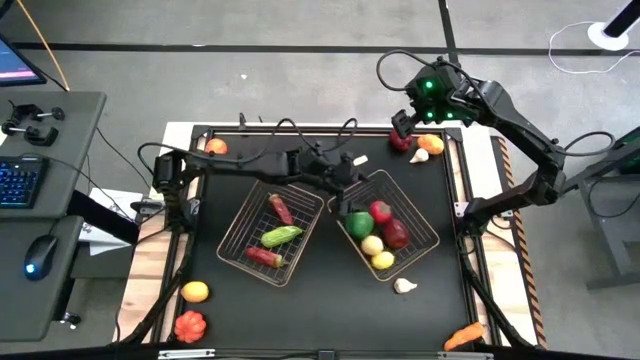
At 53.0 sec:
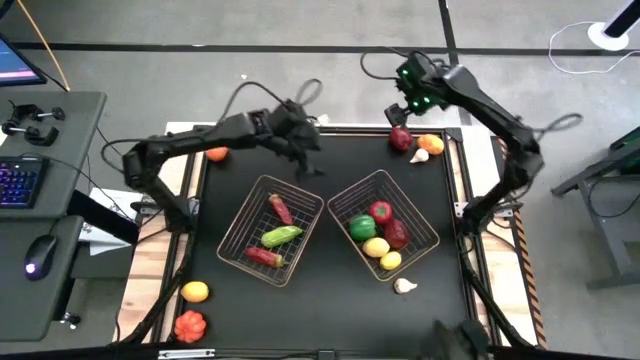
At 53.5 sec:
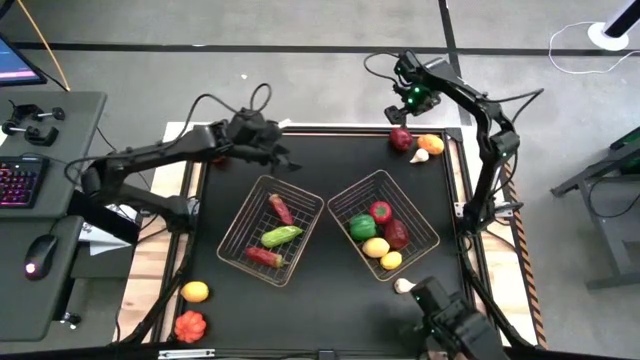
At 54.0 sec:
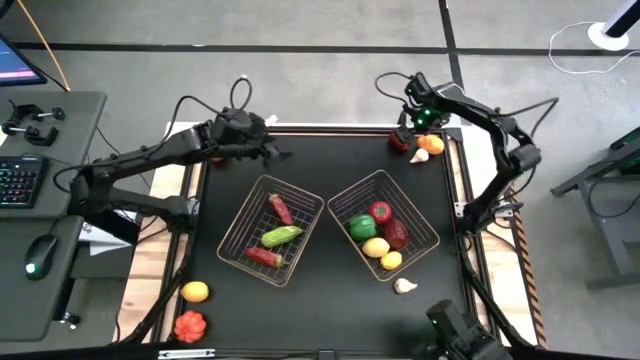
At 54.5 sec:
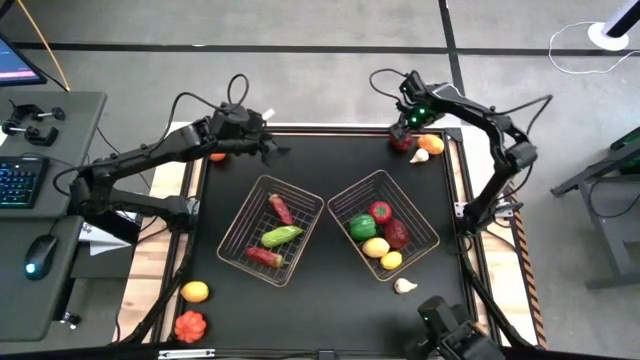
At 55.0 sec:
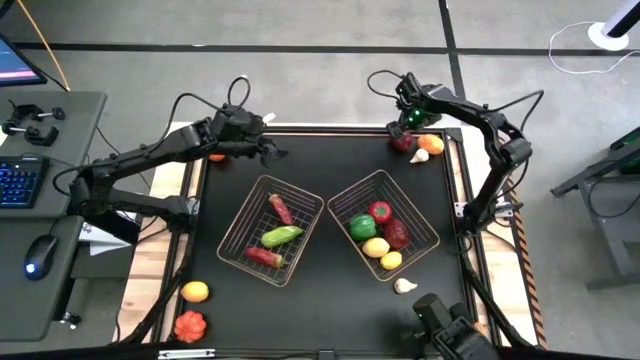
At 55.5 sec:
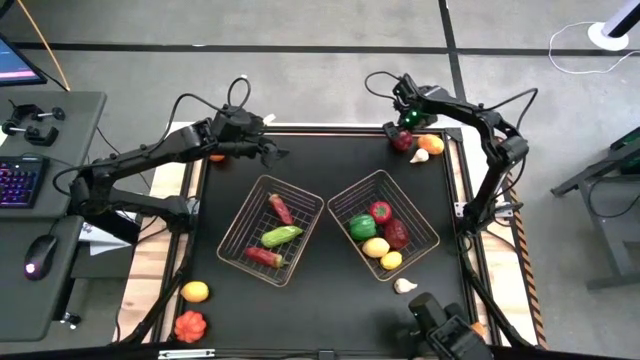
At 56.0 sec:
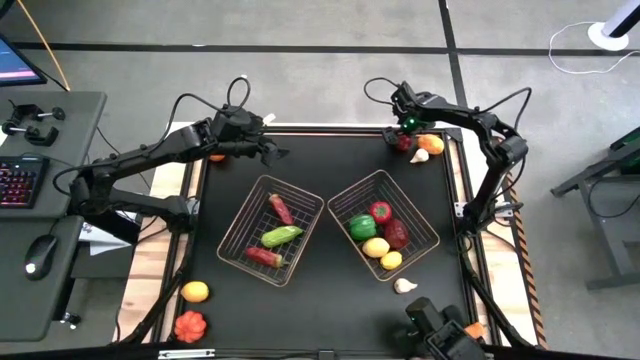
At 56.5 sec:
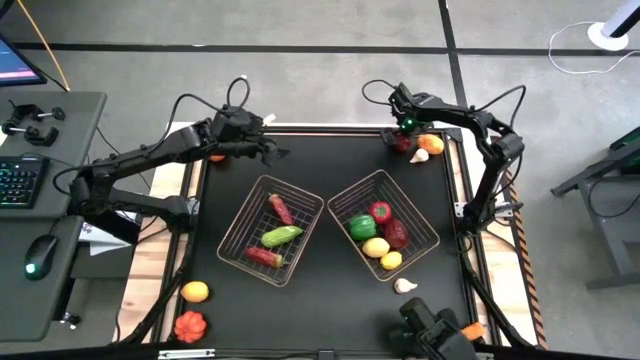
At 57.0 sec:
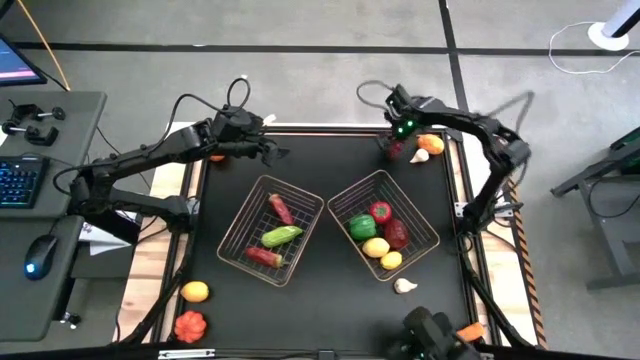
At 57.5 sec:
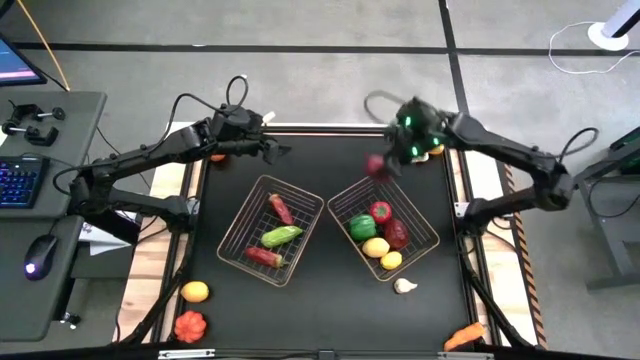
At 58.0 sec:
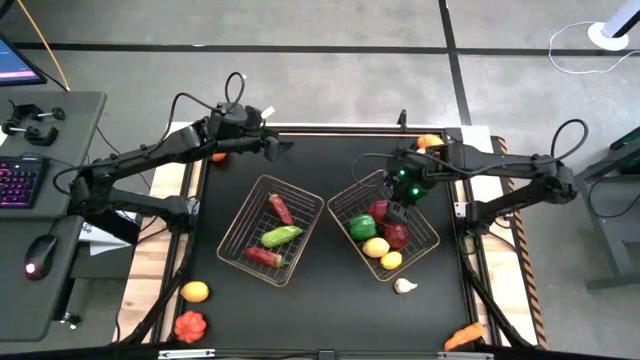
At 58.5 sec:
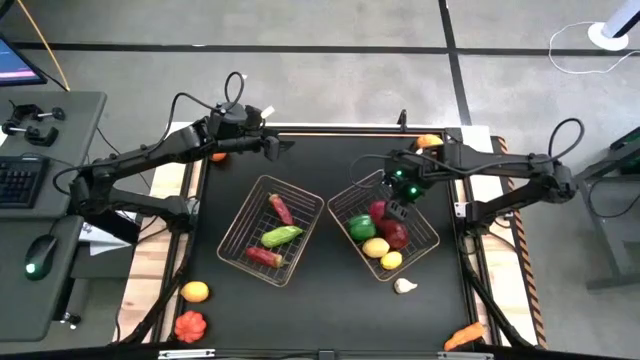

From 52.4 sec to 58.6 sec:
Task: Sort produce into baskets
Put the apple into the right basket

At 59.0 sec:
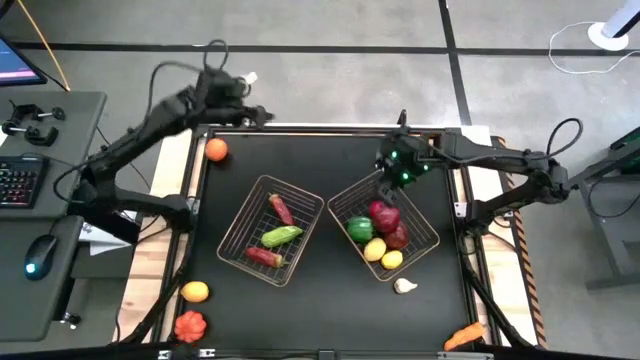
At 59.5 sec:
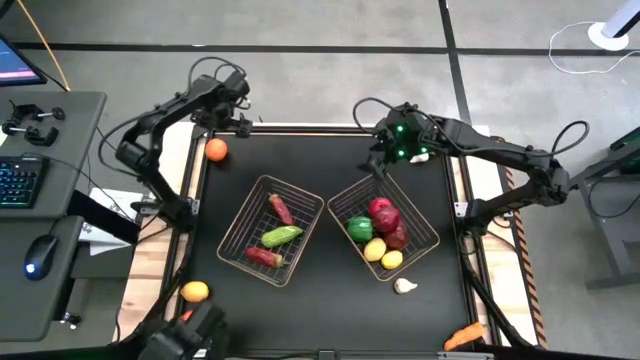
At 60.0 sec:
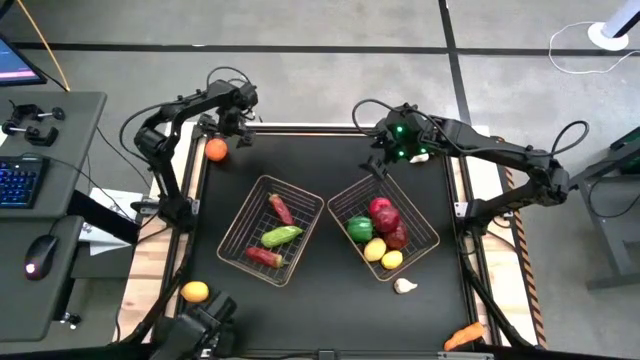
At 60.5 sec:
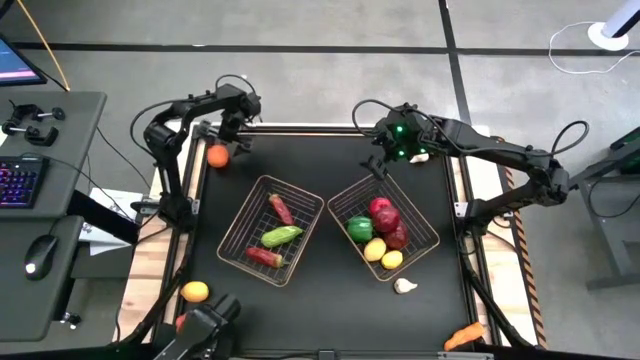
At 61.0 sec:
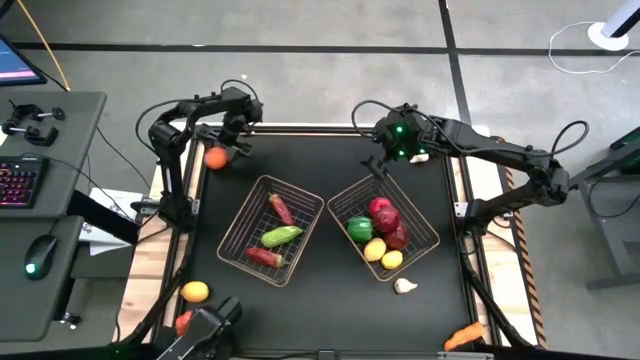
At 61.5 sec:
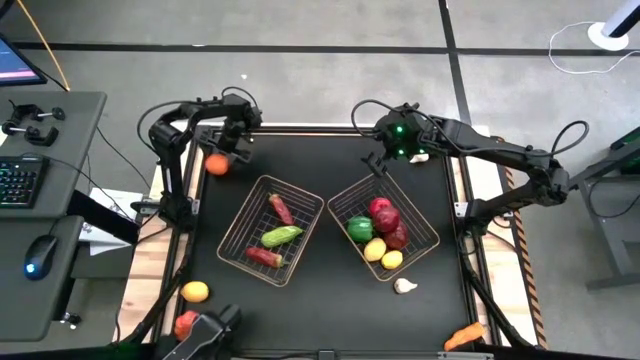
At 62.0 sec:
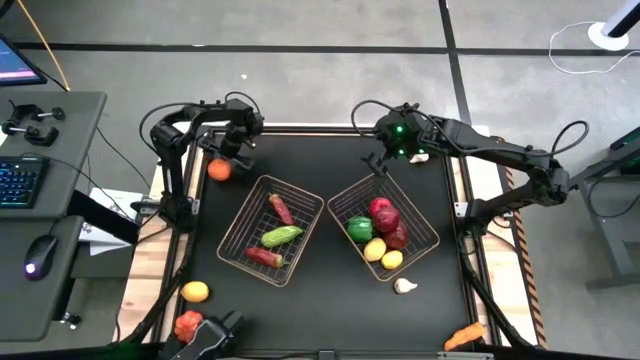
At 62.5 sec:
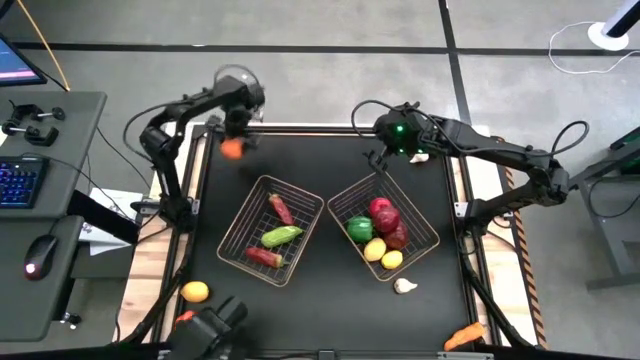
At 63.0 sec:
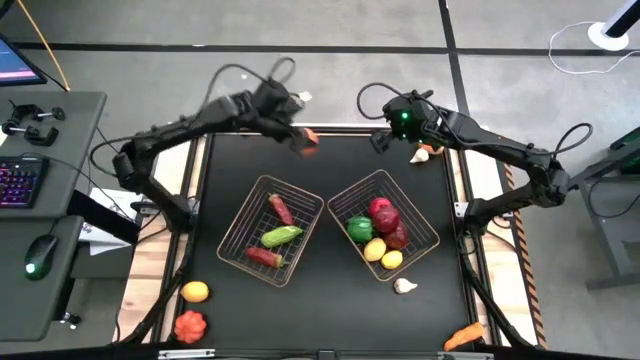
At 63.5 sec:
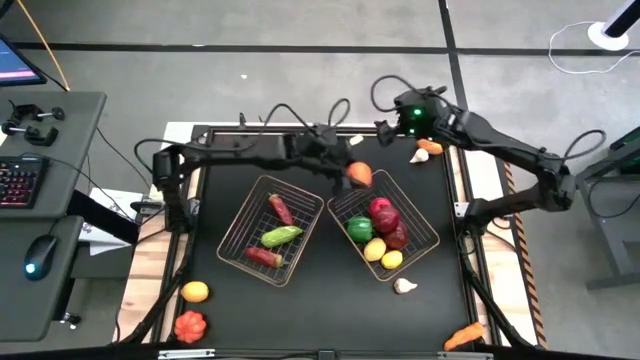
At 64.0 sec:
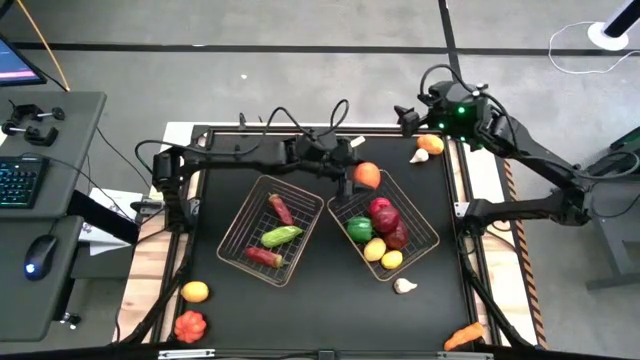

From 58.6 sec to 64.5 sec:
Put the orange into the right basket

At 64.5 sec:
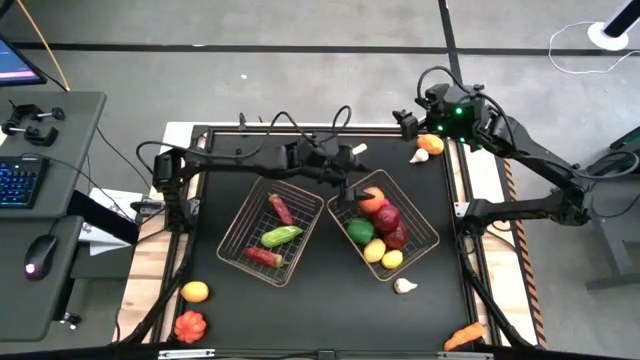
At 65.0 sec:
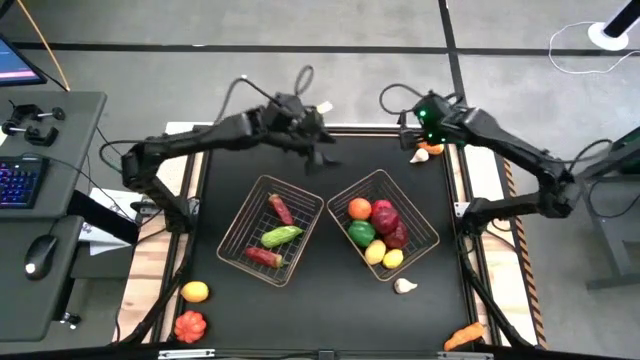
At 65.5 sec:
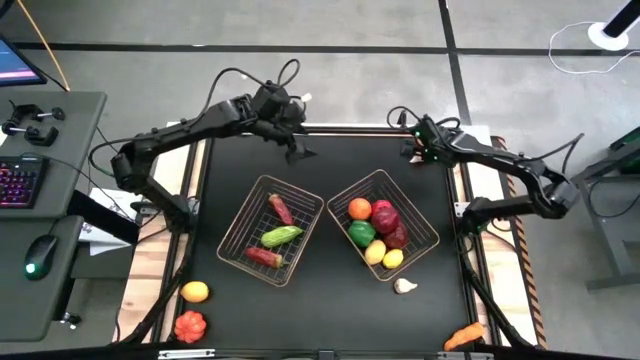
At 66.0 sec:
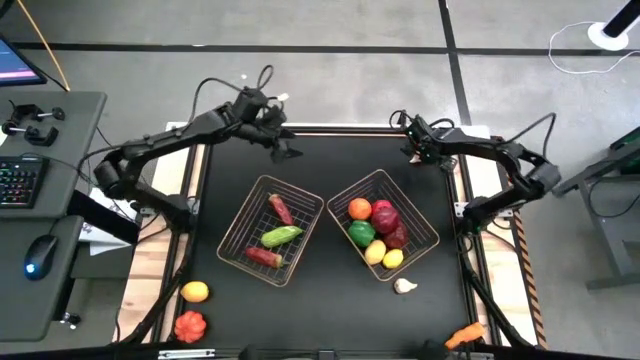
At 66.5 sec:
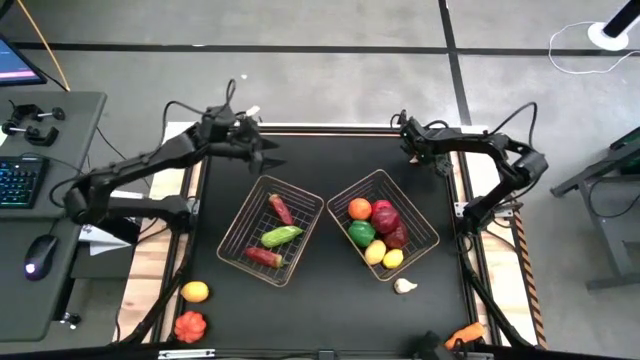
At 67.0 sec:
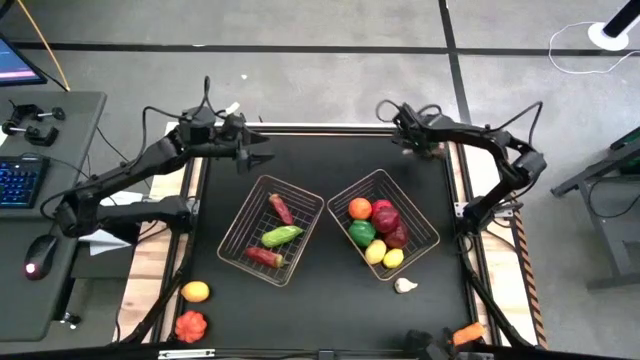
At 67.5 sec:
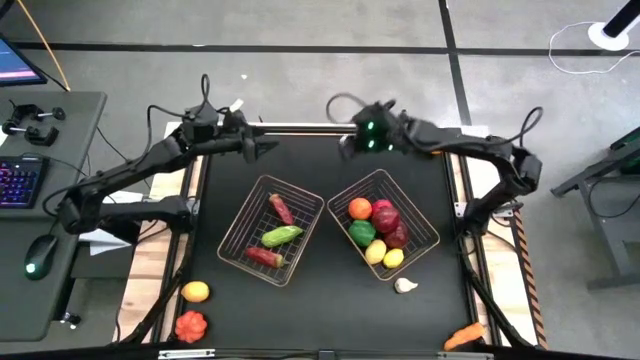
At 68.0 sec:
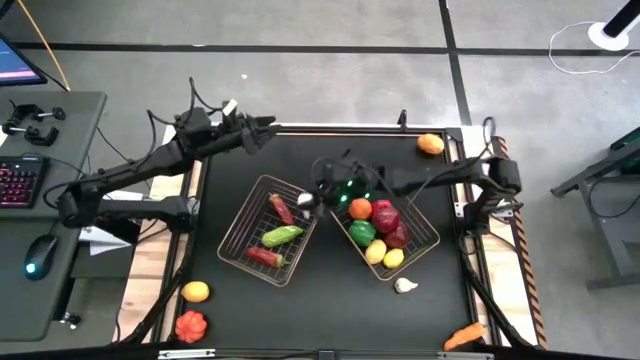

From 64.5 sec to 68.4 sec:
Put the top garlic into the left basket

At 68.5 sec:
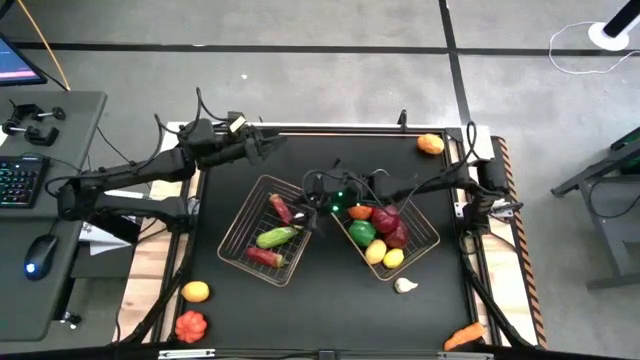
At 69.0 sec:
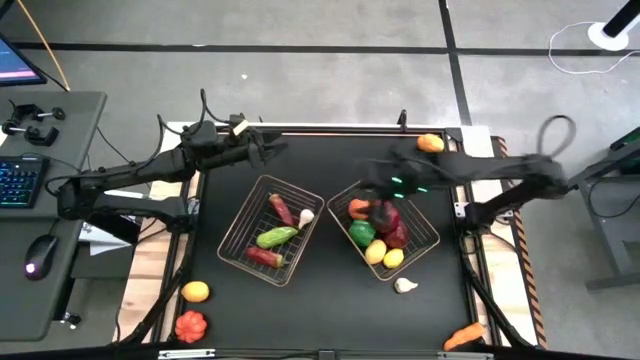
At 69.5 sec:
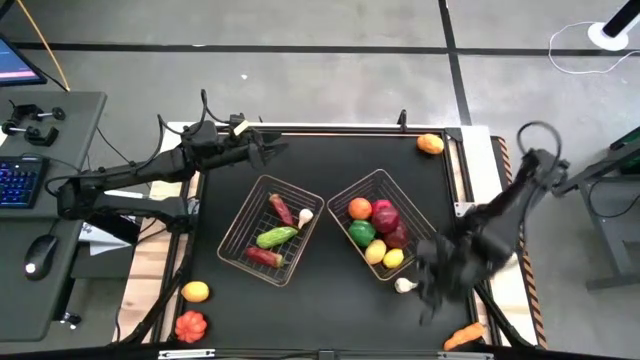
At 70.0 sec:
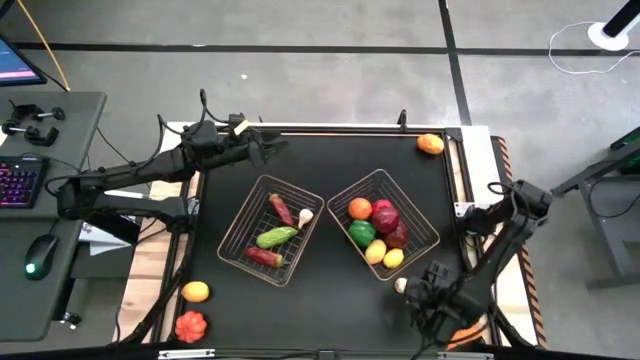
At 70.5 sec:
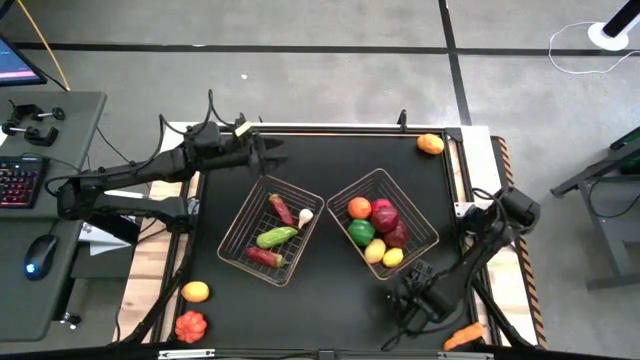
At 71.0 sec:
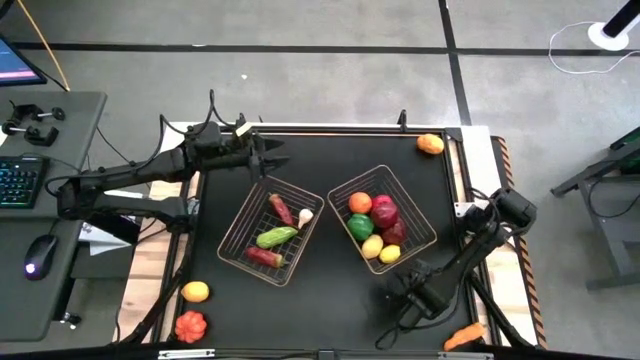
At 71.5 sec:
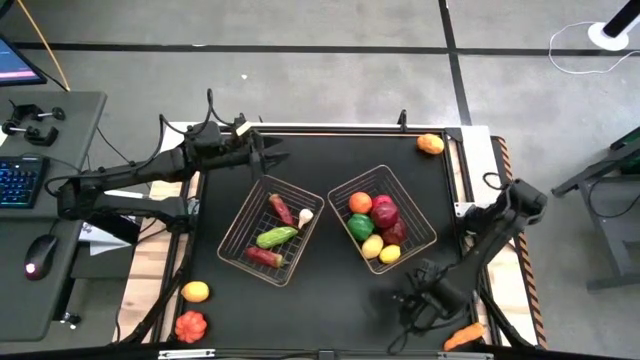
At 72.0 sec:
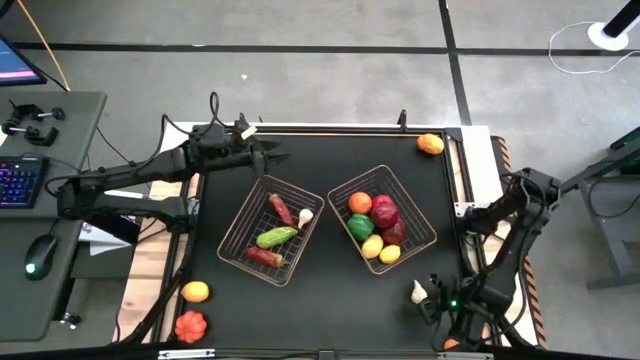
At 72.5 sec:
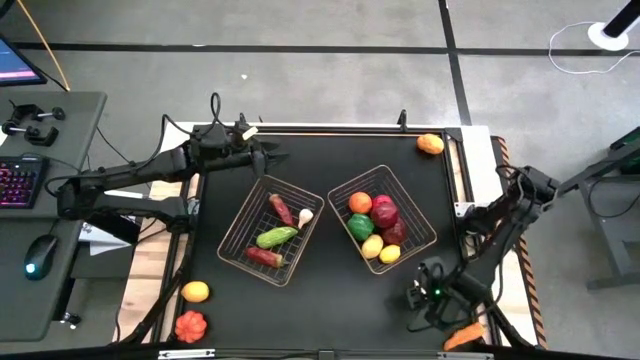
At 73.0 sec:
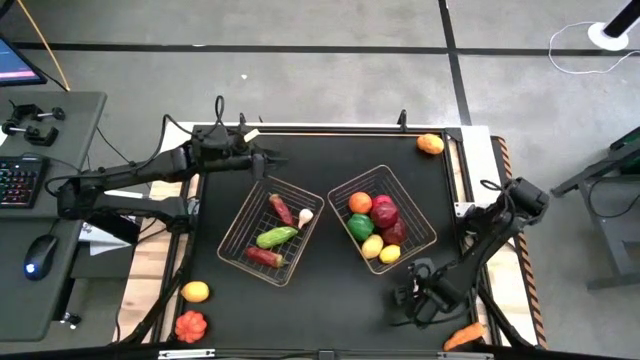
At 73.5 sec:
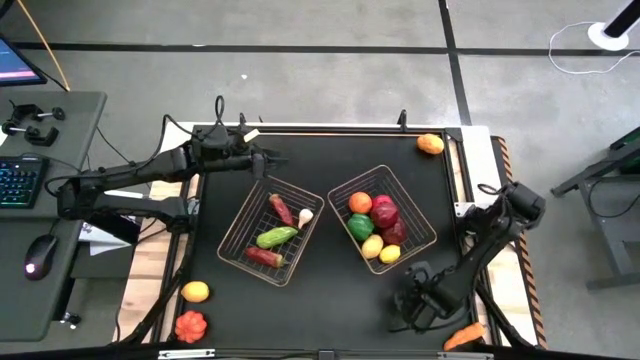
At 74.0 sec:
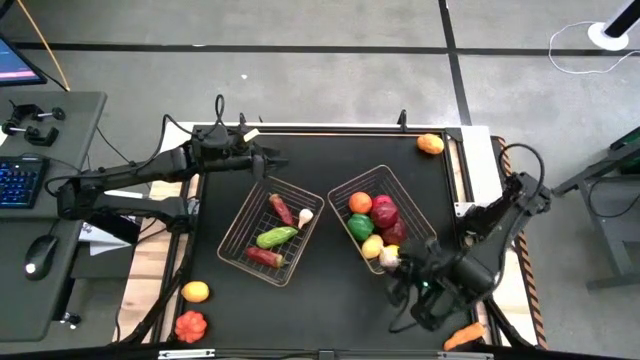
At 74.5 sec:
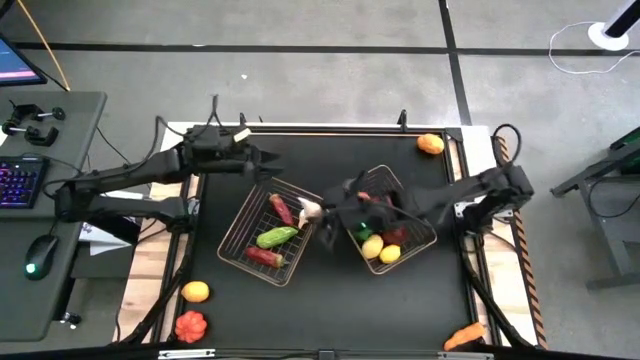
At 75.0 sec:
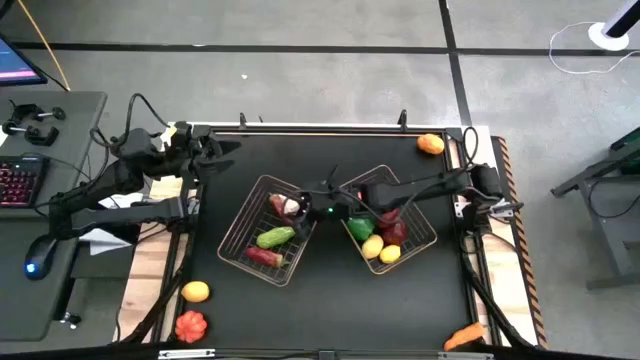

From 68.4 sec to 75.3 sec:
Put the garlic into the left basket
